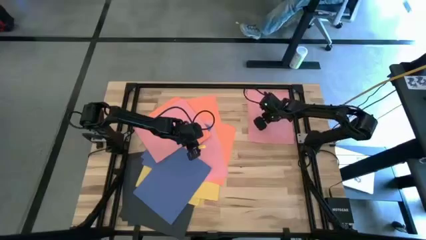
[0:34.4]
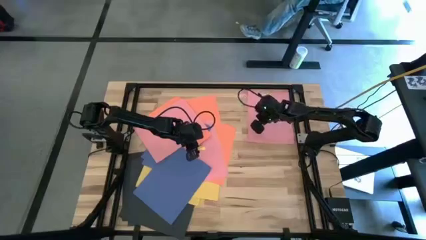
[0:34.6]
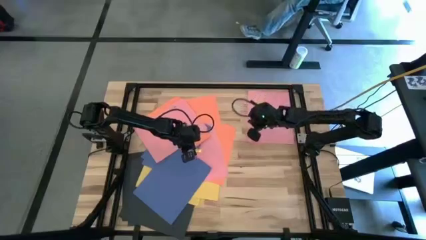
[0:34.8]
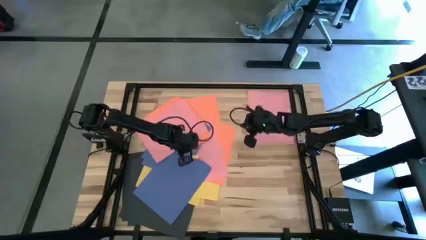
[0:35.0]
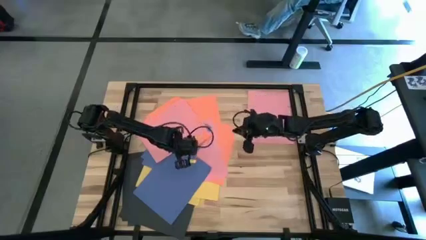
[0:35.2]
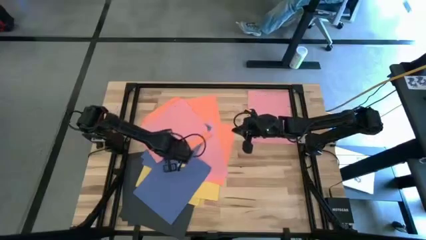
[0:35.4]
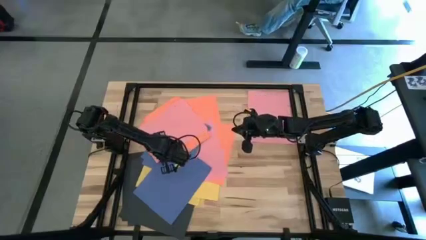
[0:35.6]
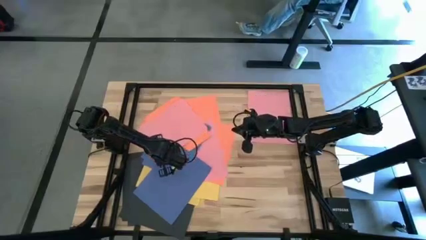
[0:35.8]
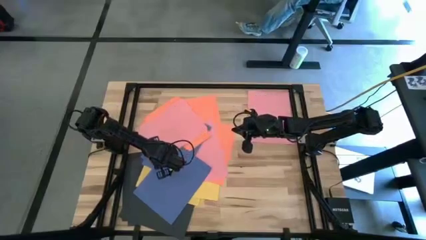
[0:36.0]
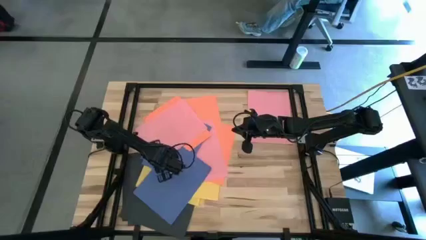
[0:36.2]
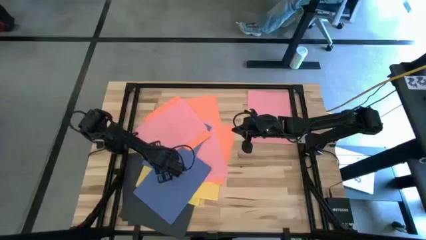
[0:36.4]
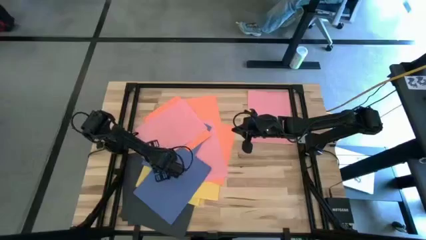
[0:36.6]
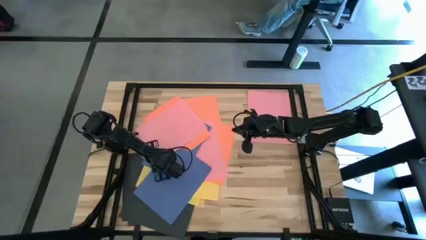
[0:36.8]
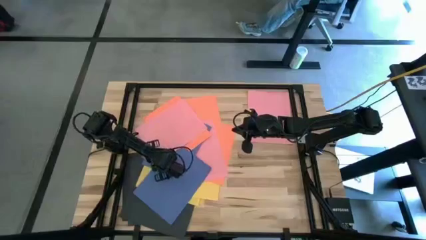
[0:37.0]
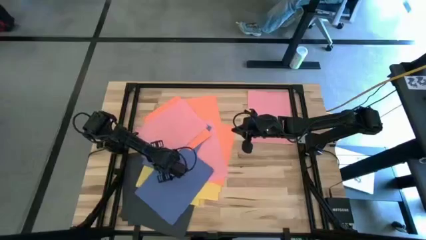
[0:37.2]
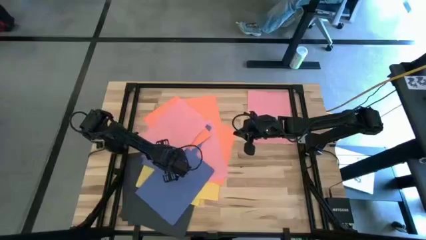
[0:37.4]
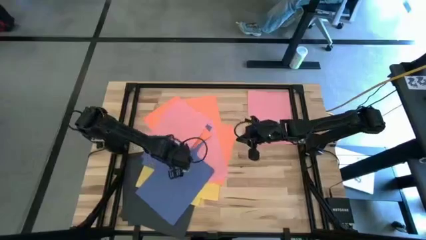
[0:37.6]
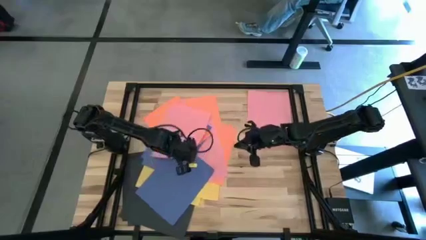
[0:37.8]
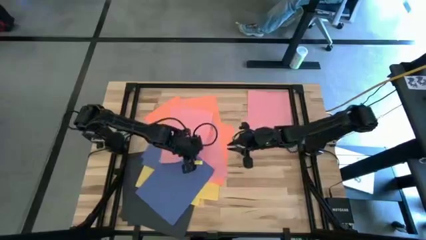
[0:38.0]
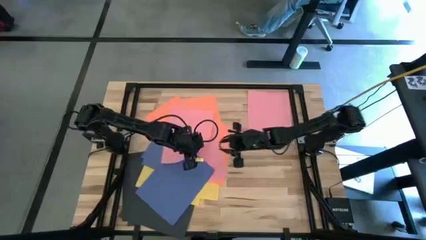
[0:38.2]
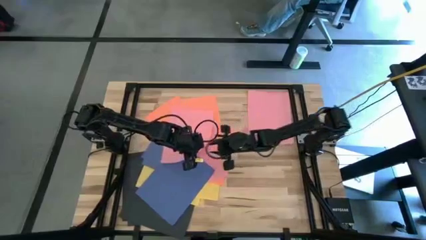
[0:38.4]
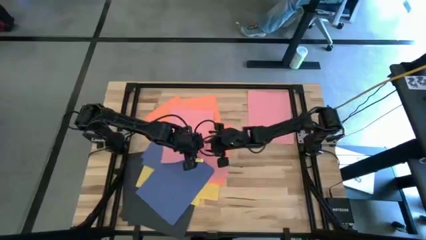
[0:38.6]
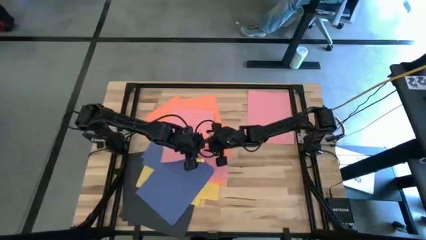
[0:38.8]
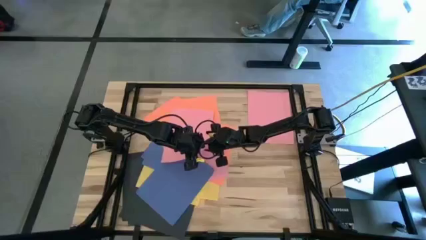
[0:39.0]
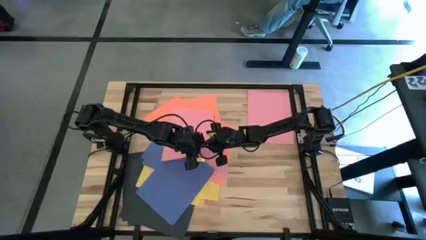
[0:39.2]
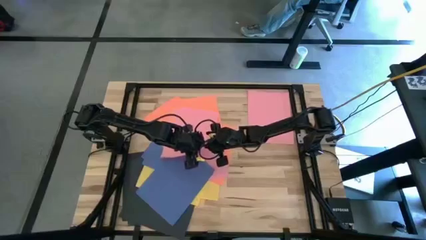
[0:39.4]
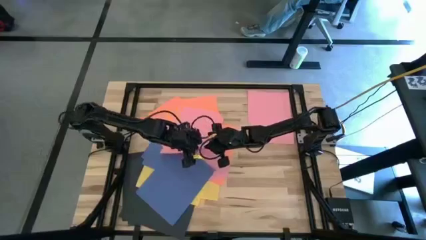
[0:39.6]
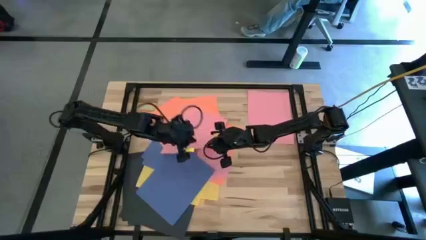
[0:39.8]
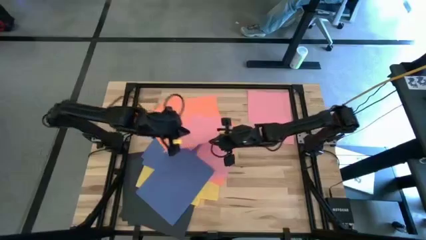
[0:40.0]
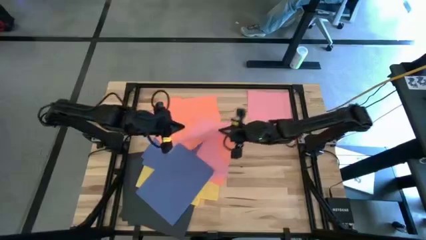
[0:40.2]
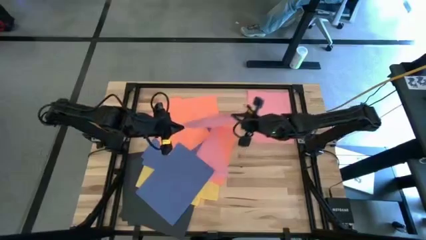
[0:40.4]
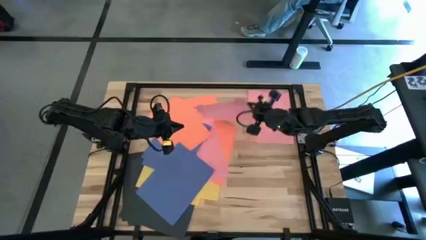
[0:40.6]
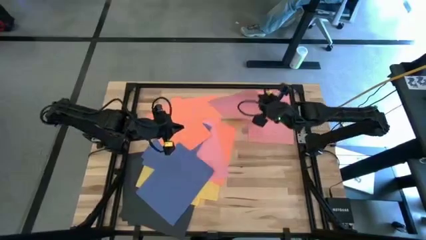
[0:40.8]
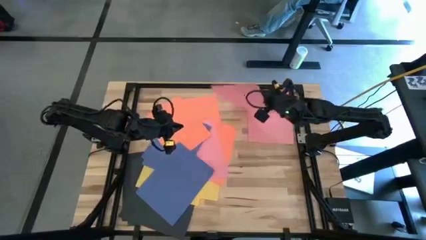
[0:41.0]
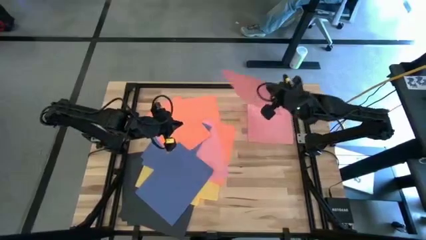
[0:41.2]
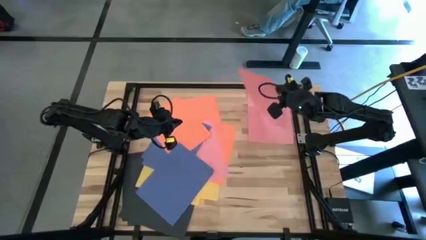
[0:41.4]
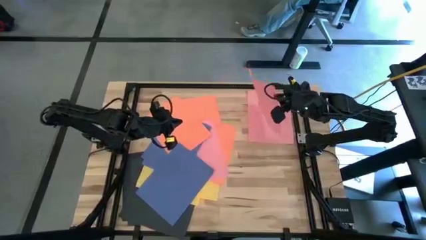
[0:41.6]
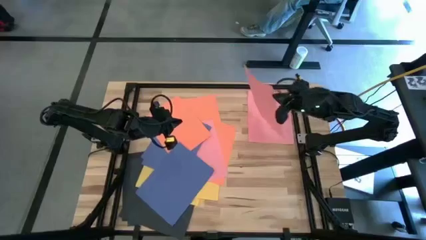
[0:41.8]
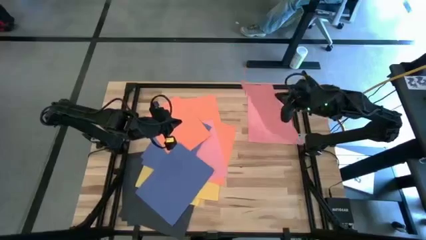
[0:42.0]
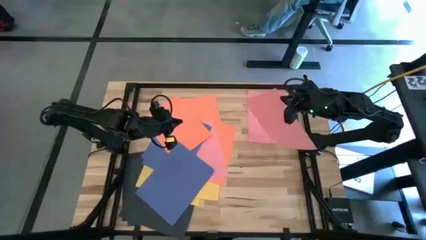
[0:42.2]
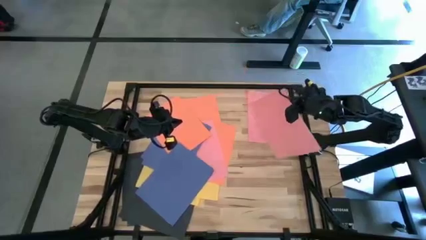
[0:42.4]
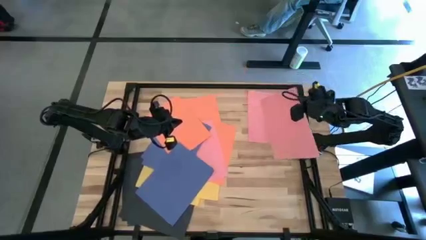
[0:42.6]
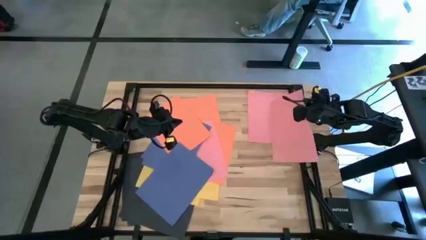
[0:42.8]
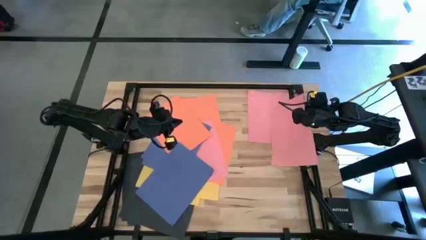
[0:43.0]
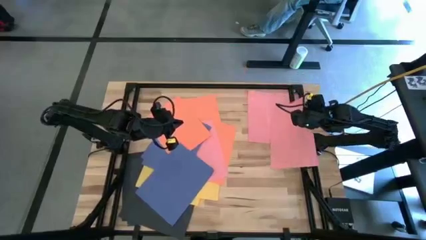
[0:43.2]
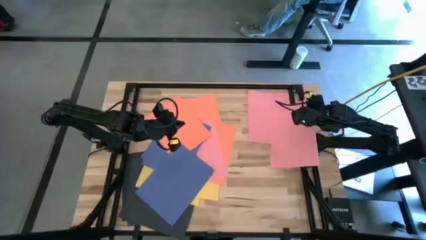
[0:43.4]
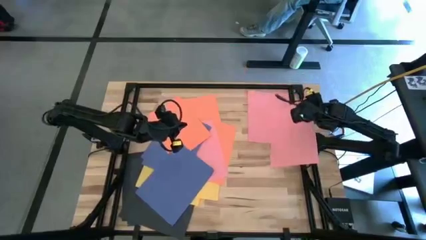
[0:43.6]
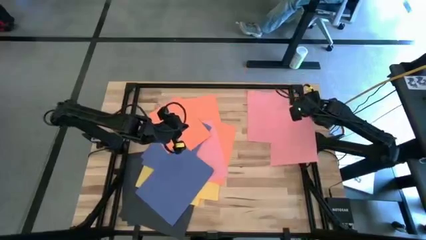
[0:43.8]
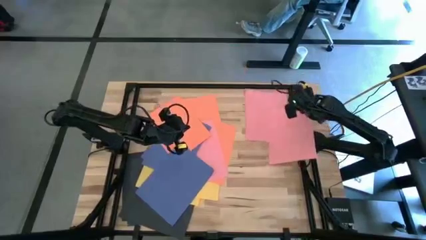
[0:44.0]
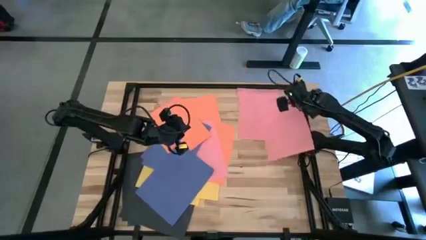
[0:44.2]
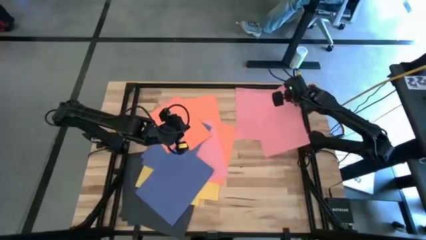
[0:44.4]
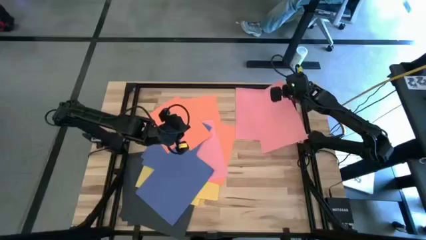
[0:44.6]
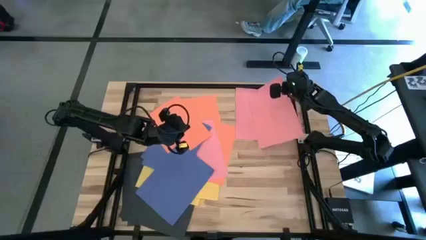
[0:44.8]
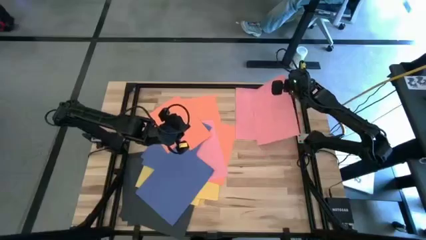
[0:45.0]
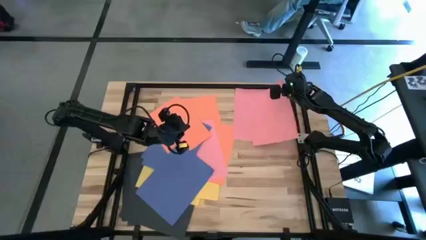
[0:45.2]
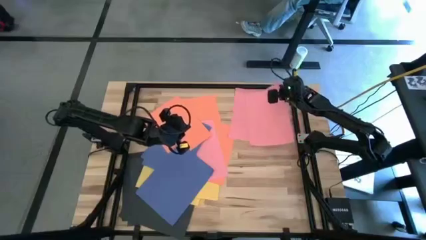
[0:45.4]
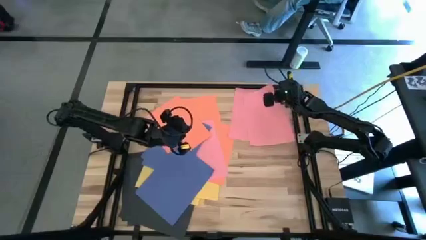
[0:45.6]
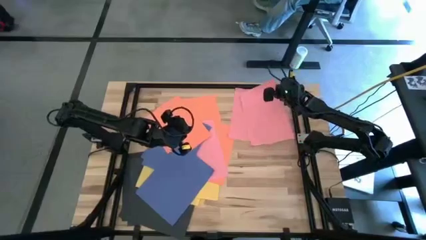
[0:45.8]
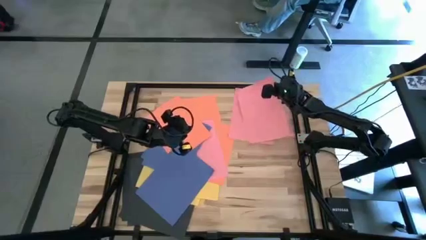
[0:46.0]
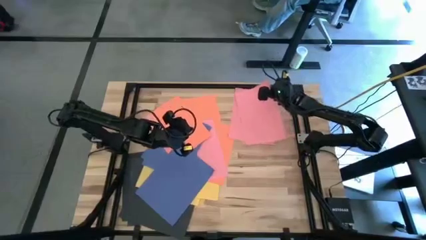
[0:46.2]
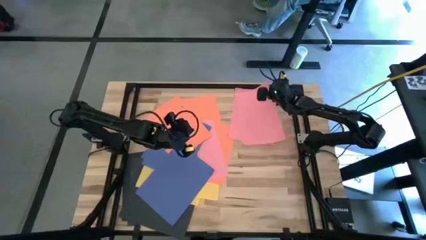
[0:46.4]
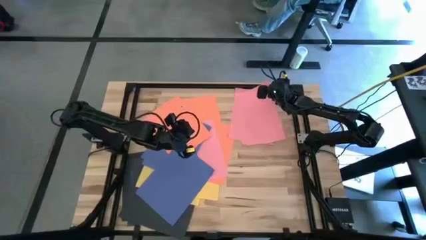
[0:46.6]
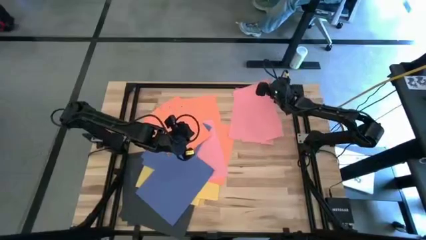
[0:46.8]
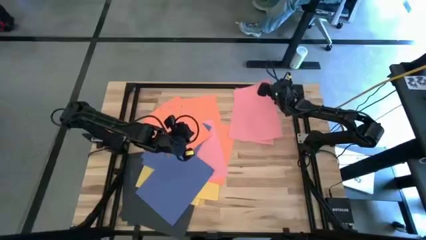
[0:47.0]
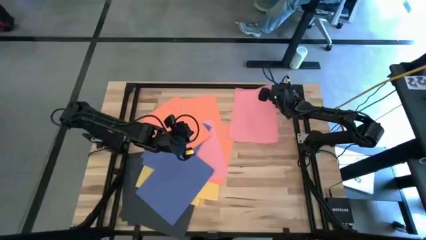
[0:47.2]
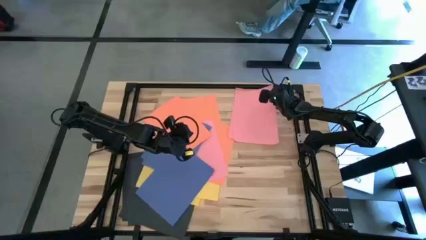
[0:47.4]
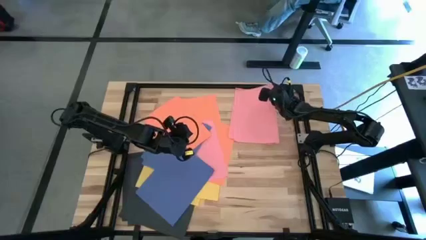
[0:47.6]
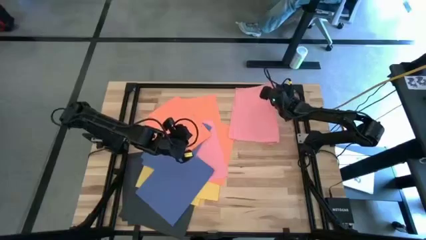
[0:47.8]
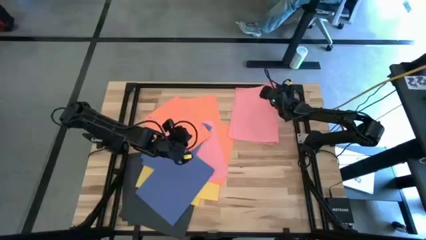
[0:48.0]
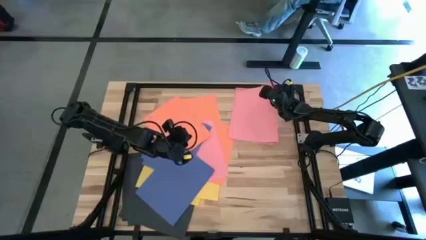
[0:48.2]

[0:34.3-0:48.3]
Task: Organize paper
Stack the pink paper on top of the pink paper

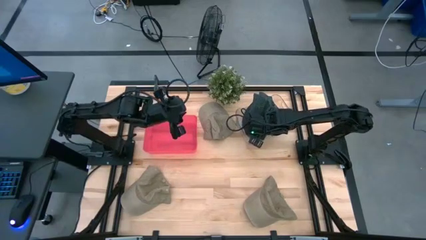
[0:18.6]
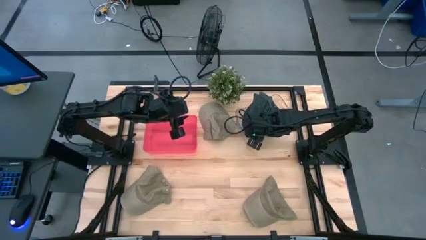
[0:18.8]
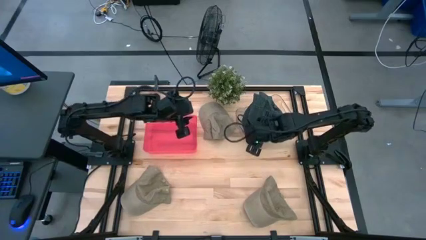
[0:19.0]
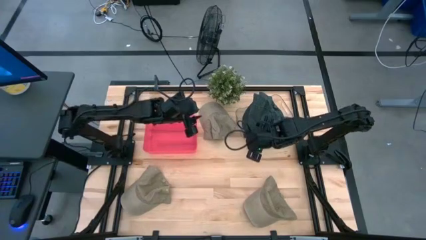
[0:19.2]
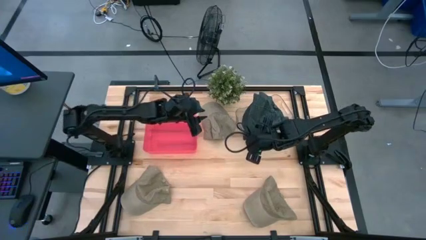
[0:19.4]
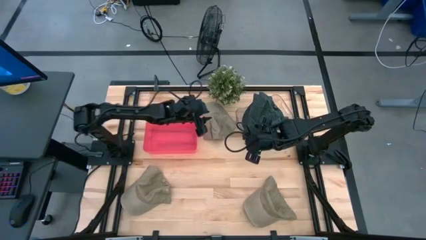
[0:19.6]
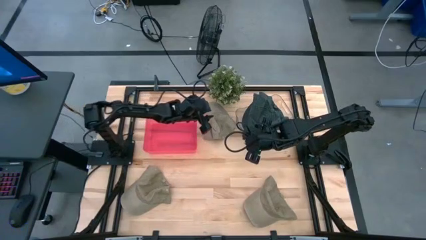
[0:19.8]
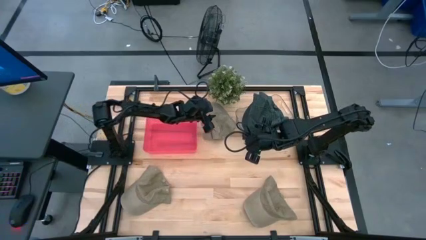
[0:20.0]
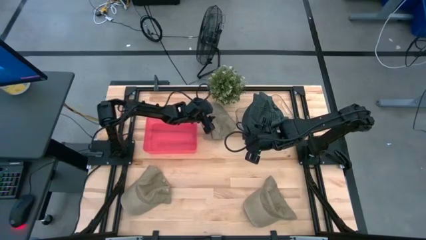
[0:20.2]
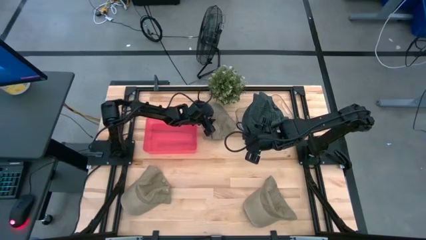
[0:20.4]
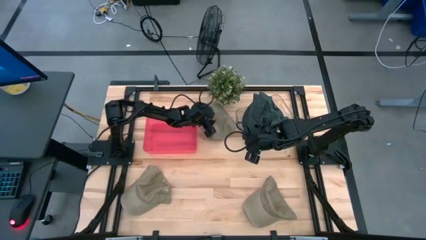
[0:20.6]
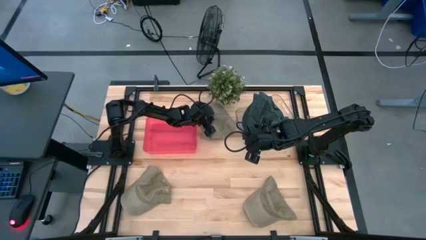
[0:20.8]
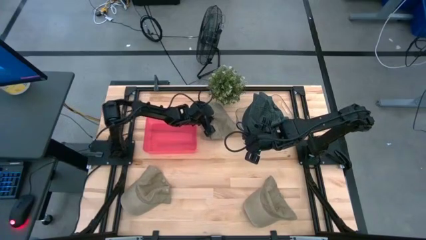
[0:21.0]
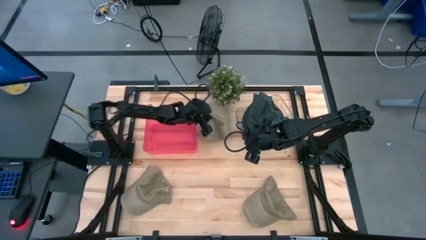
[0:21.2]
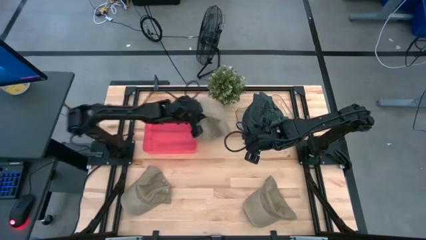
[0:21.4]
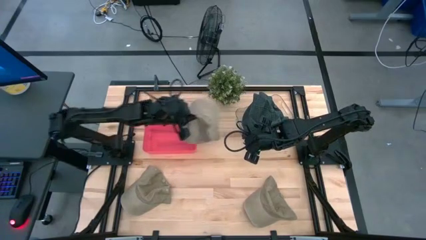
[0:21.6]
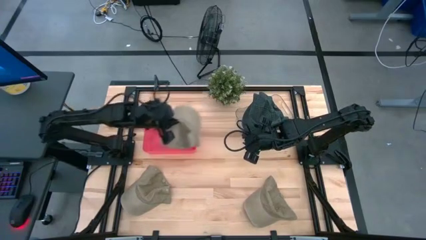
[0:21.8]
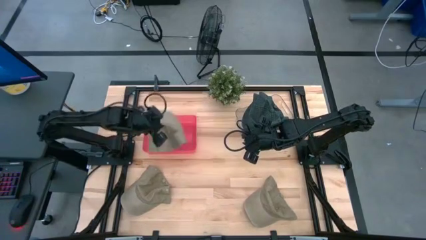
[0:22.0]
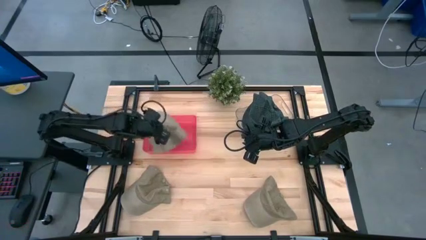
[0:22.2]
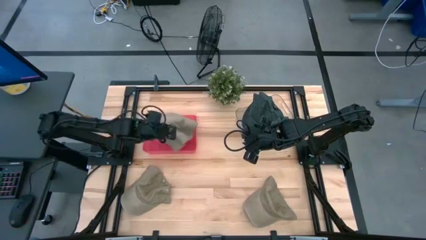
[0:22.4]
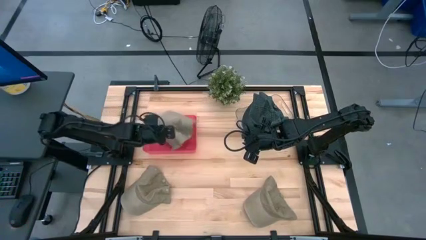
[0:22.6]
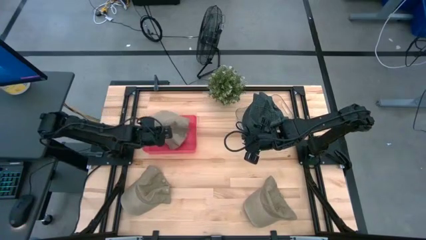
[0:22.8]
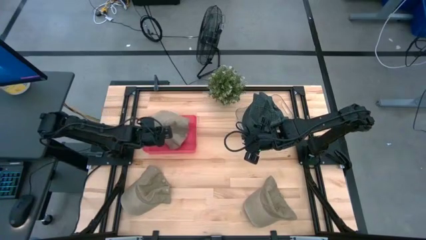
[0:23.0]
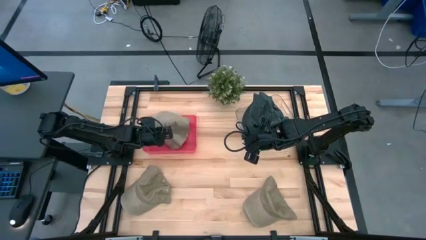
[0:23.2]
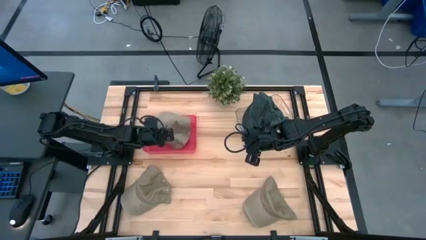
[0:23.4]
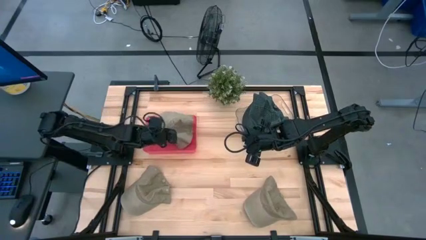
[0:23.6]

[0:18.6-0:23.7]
Task: Pick & Place hat
Put the top brown cap into the red bin
